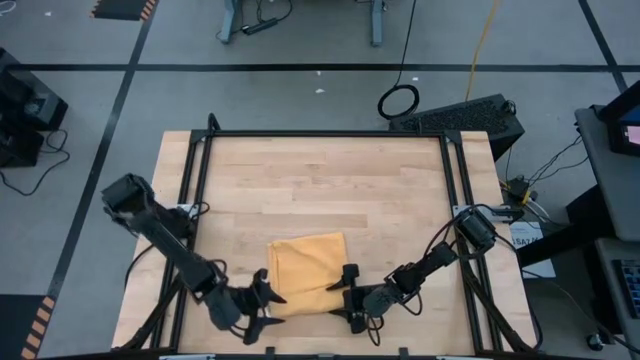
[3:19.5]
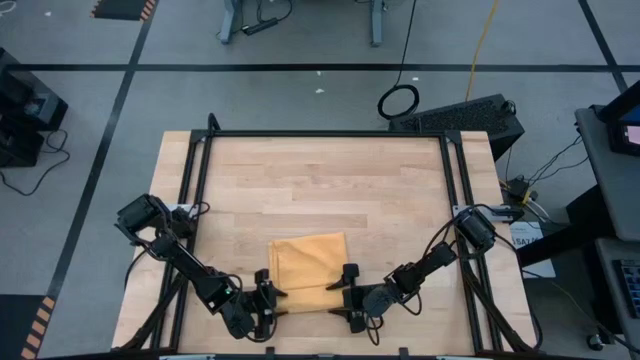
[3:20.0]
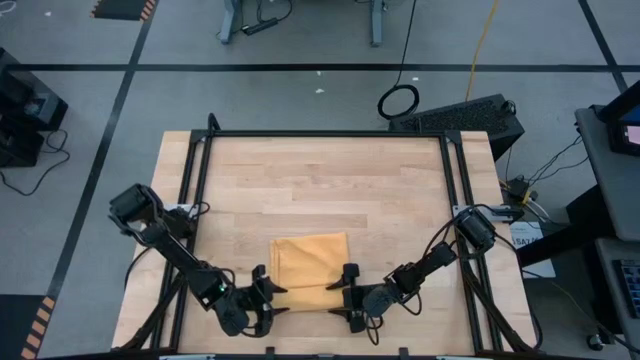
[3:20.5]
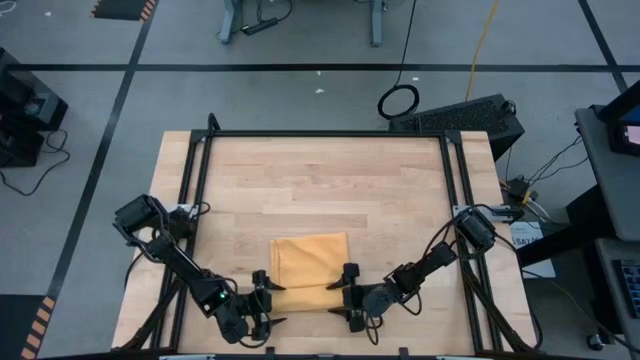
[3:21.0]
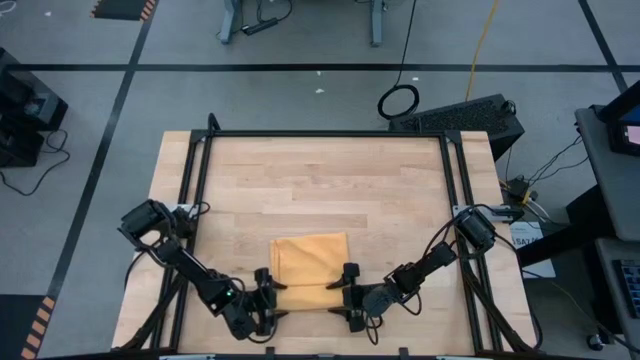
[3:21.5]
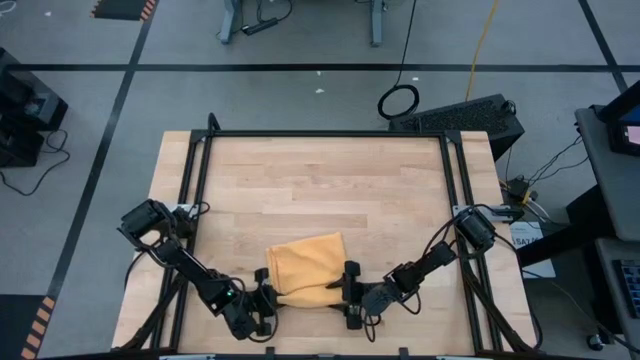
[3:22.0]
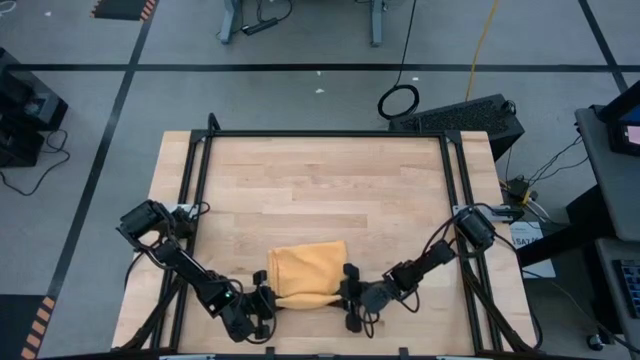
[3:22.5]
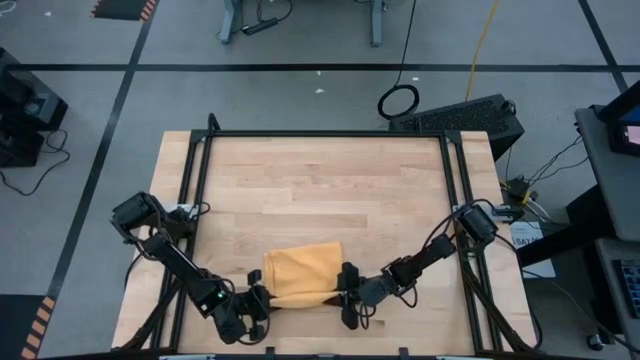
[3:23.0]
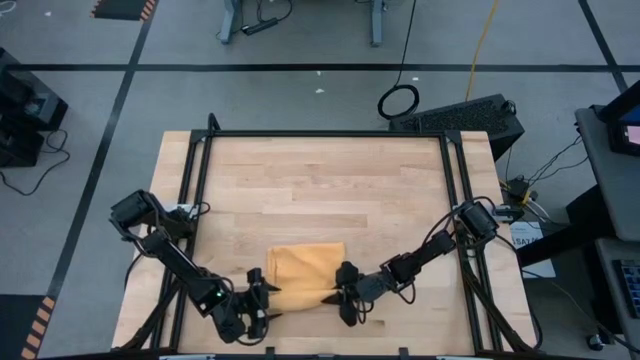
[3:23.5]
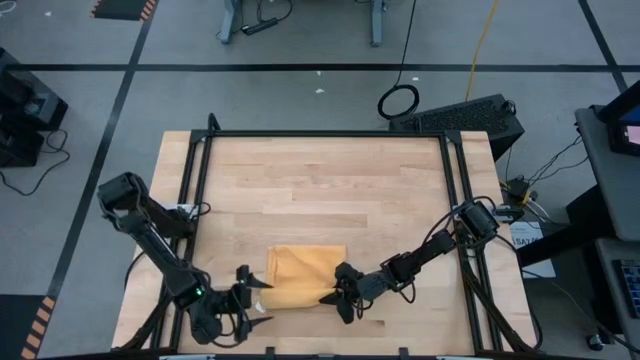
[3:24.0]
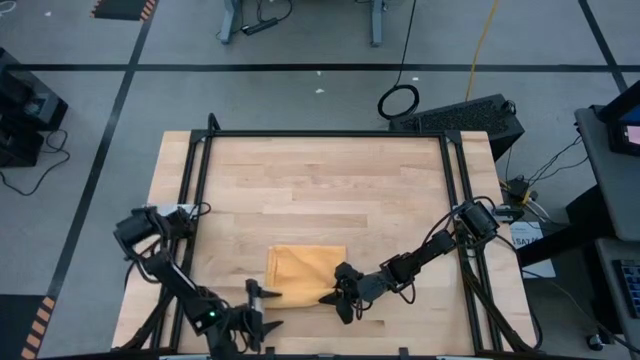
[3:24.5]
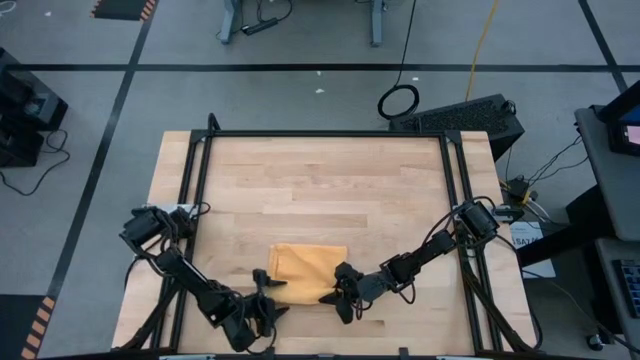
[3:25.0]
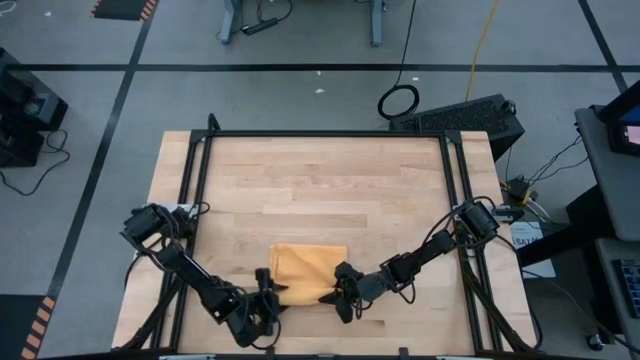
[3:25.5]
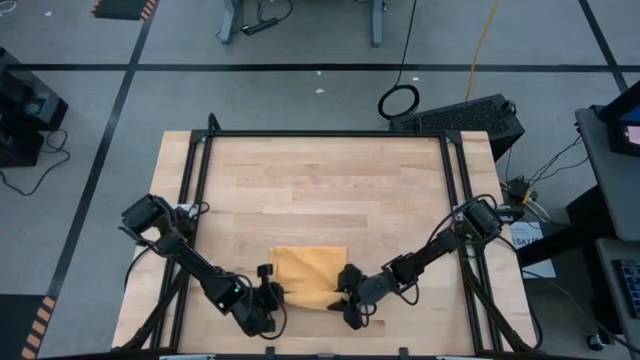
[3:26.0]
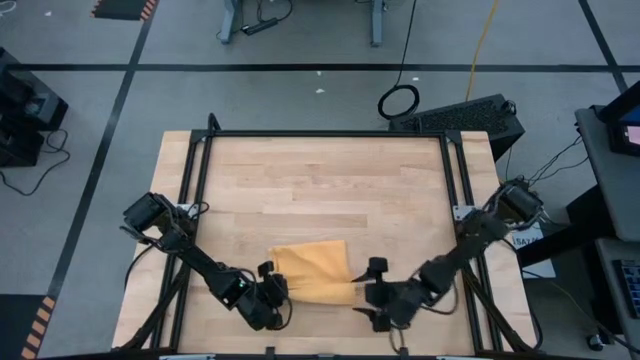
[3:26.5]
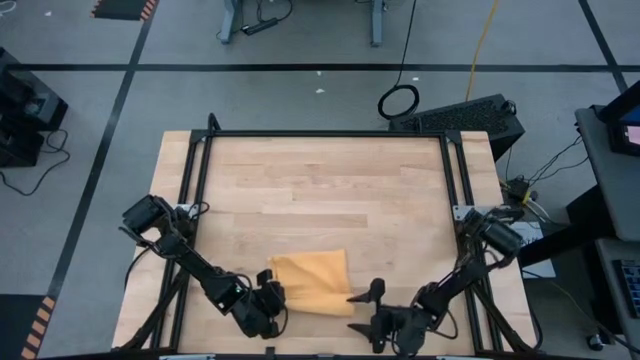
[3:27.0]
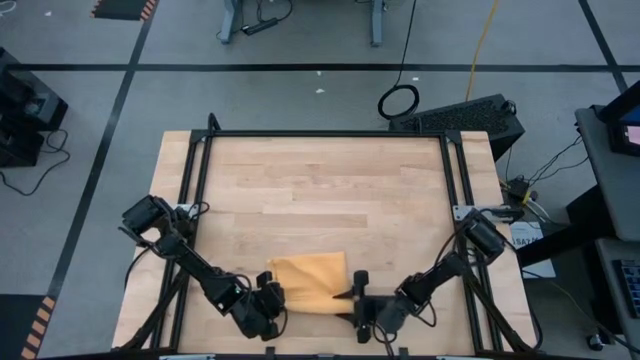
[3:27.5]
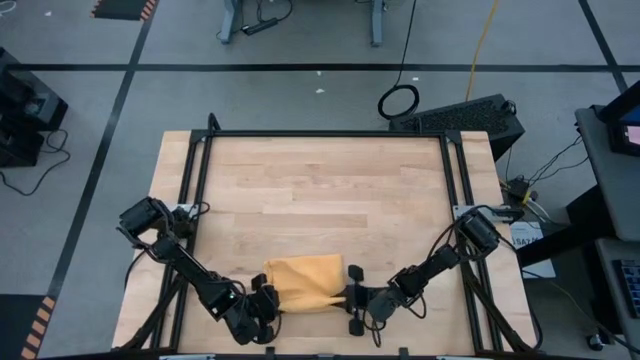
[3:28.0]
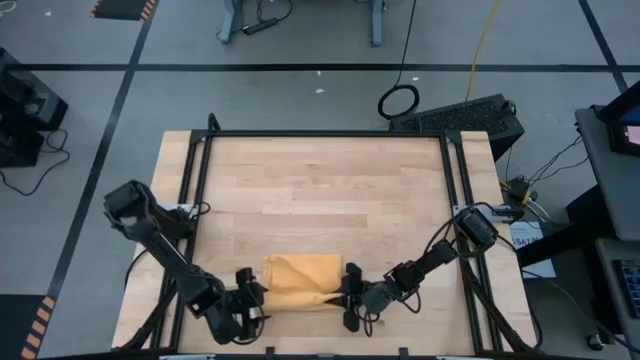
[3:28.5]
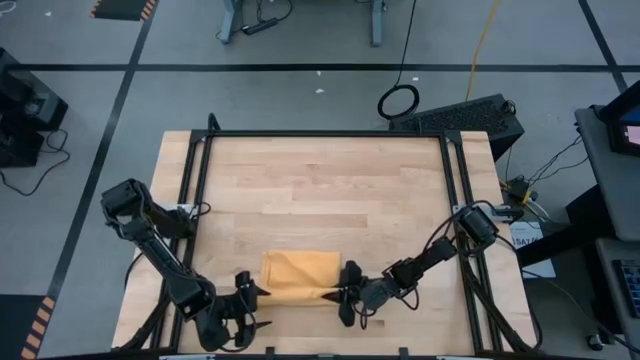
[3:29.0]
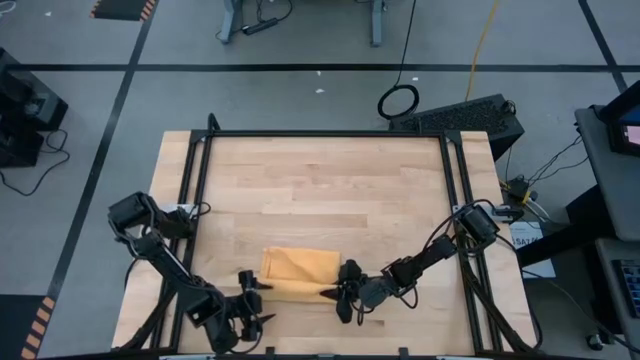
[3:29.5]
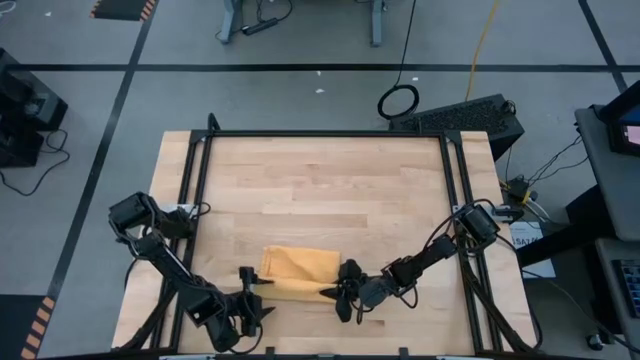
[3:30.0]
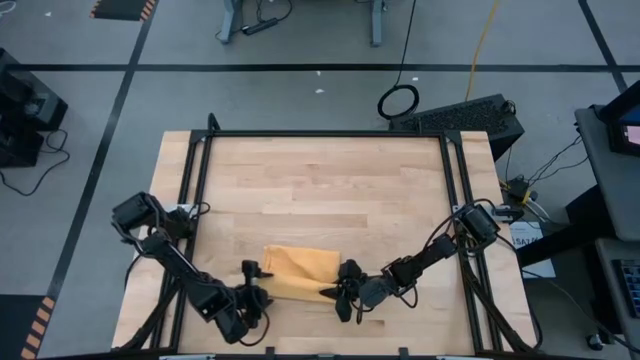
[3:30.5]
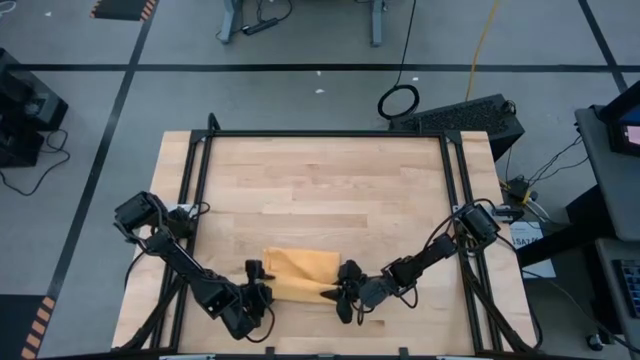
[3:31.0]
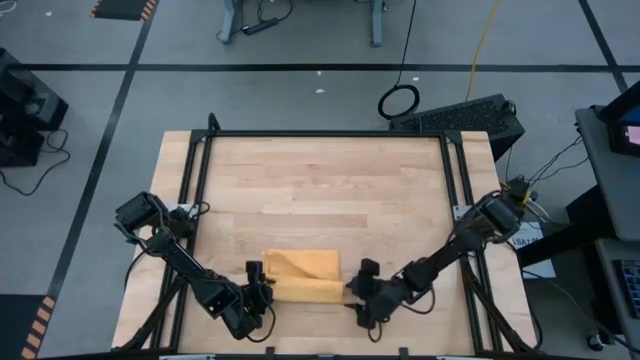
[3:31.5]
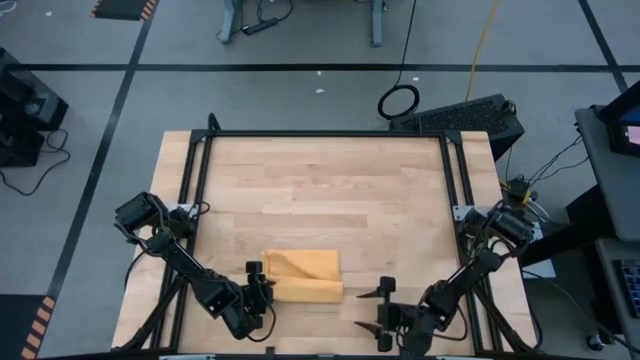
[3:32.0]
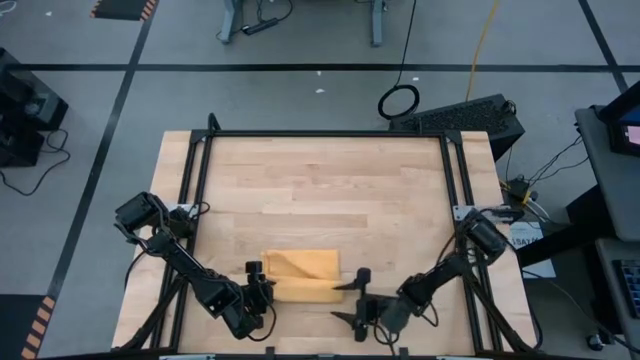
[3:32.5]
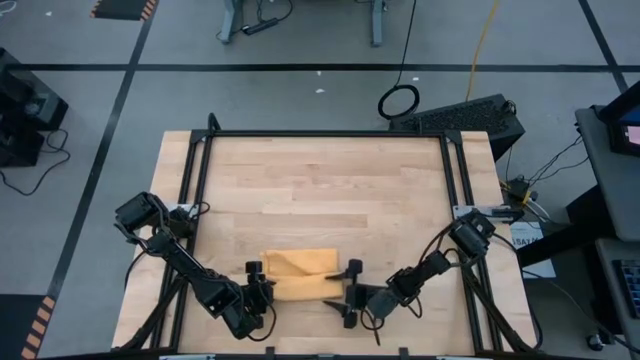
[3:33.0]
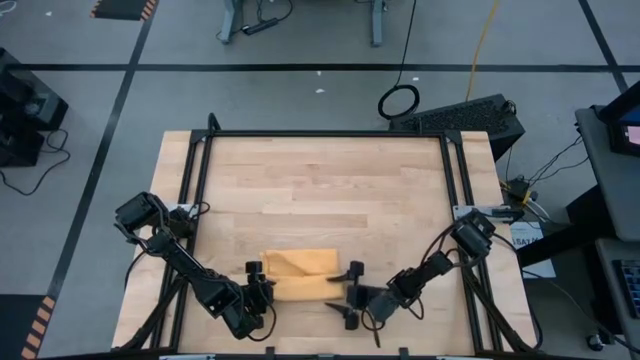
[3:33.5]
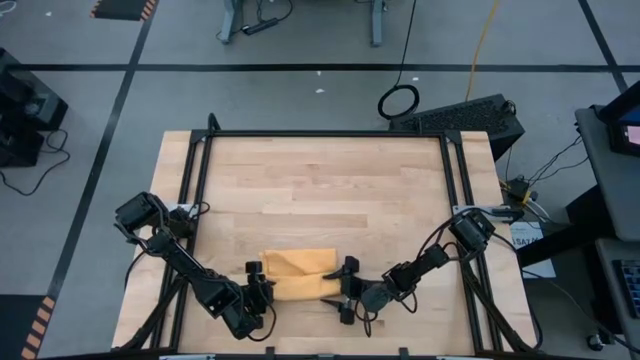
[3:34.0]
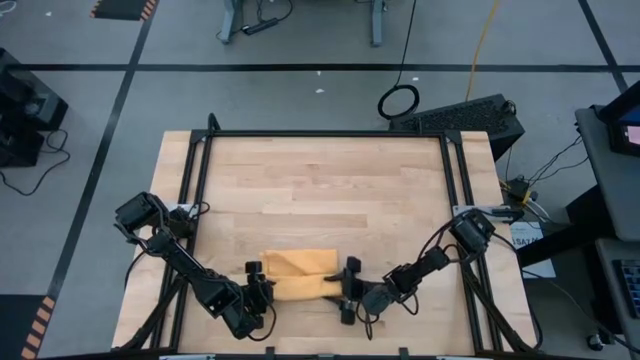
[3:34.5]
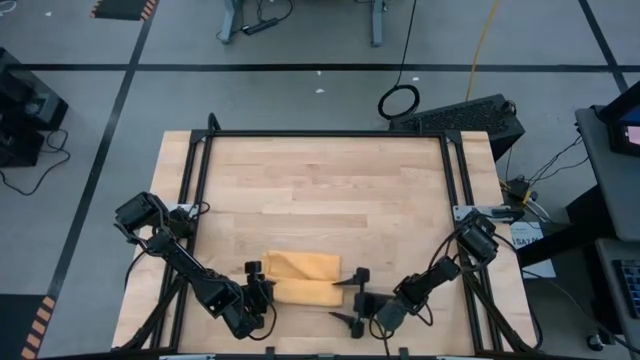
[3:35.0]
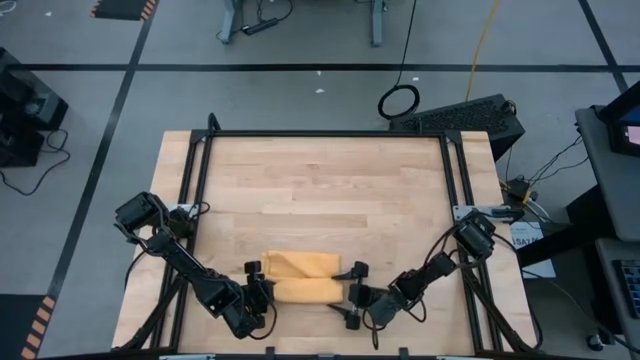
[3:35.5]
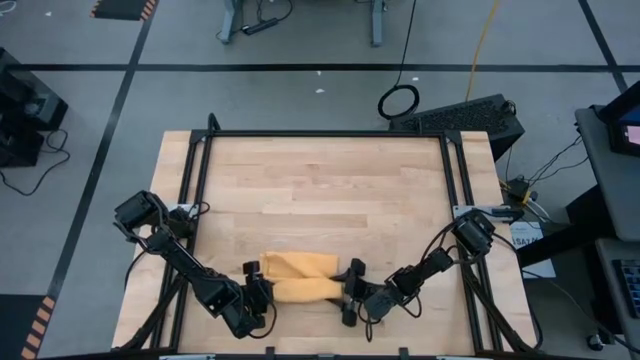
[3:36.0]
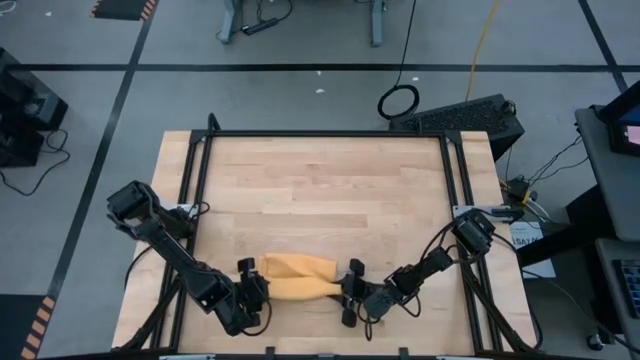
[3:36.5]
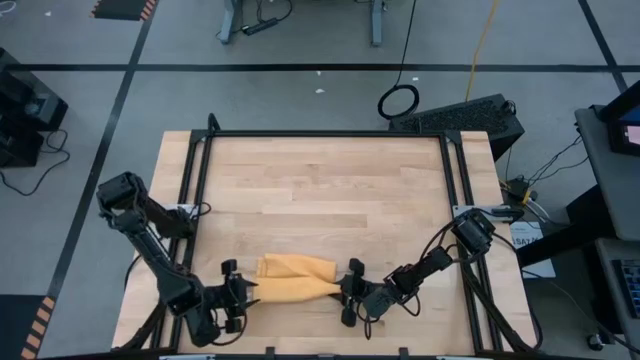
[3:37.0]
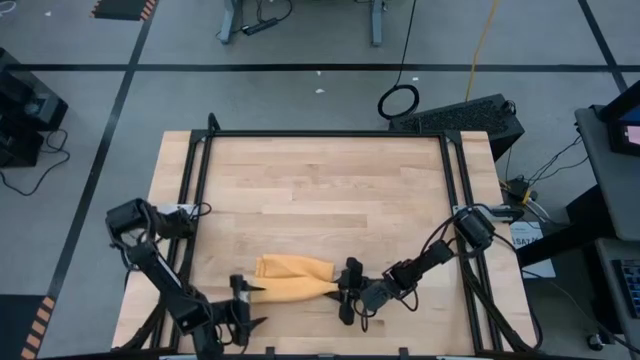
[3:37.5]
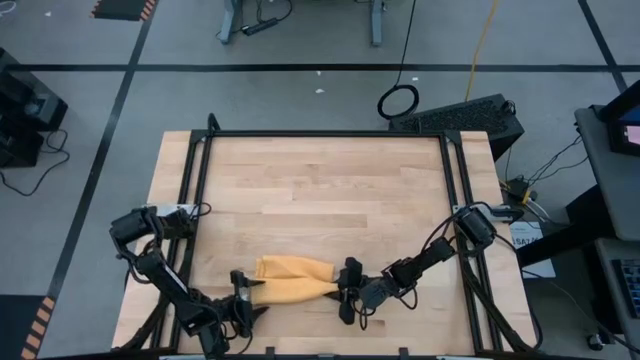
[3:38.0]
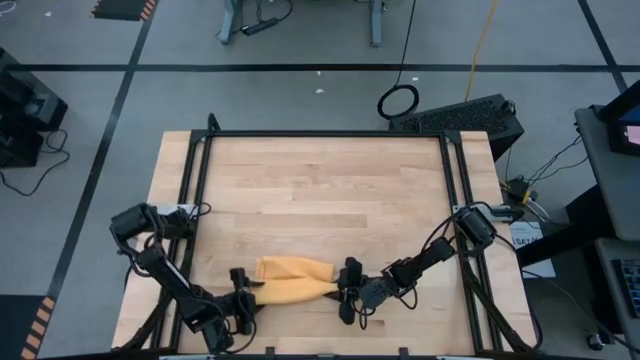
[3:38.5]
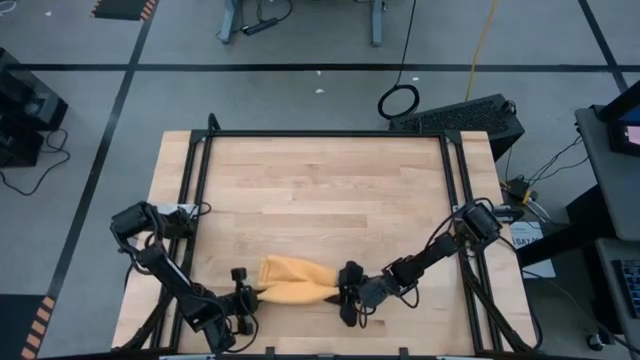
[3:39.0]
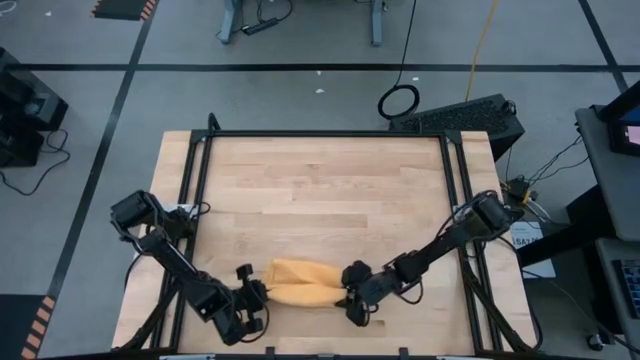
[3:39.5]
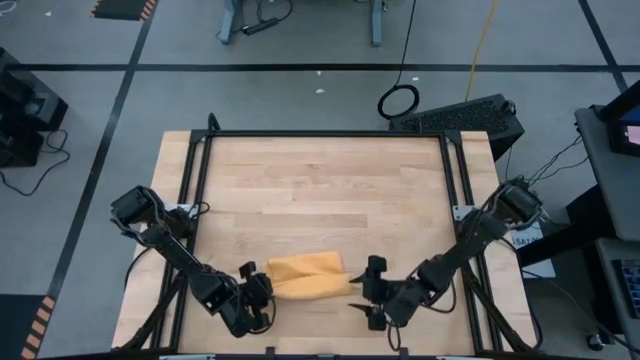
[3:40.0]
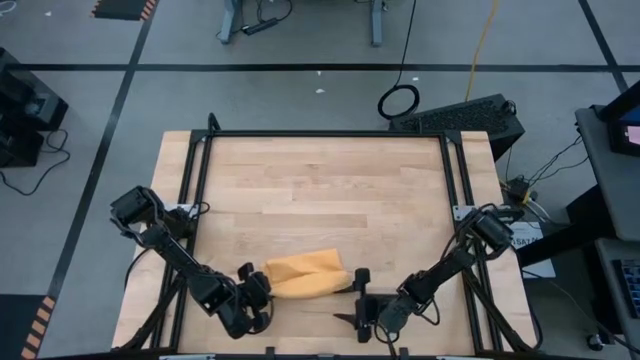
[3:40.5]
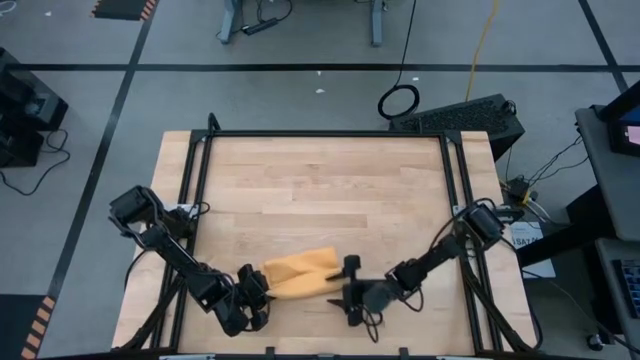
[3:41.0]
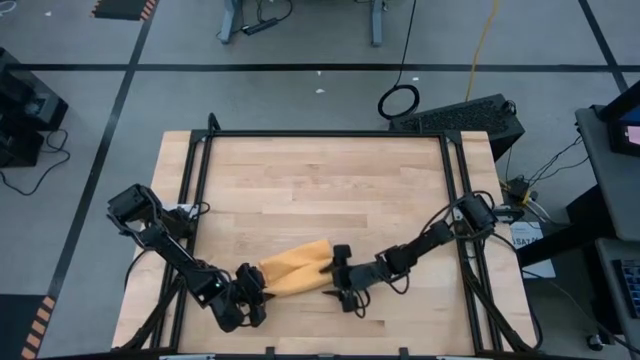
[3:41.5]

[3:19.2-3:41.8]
Task: Roll towel
Roll the folded yellow towel
